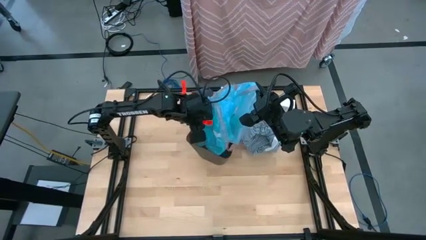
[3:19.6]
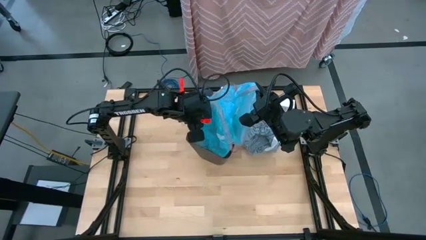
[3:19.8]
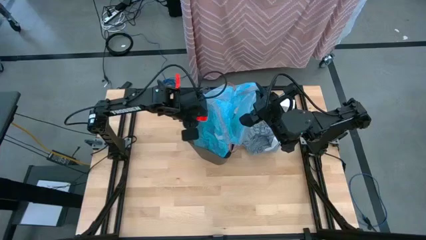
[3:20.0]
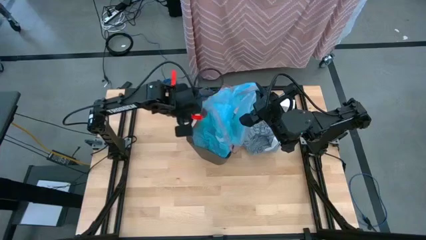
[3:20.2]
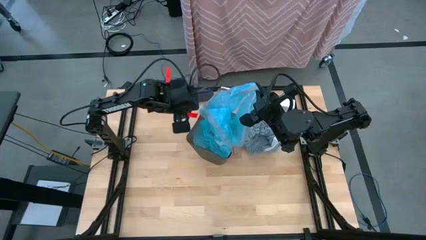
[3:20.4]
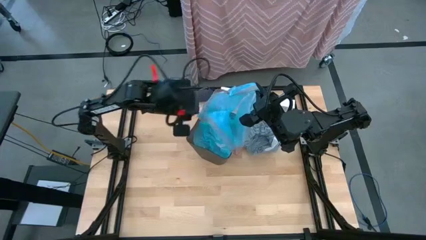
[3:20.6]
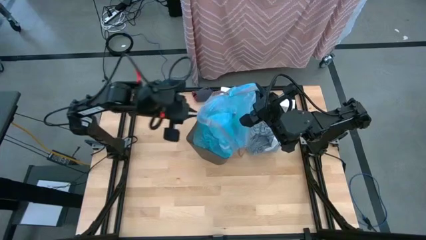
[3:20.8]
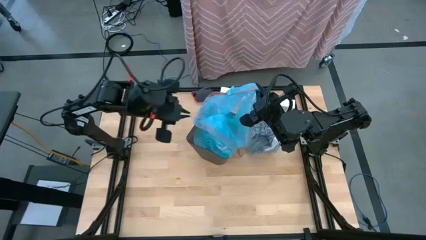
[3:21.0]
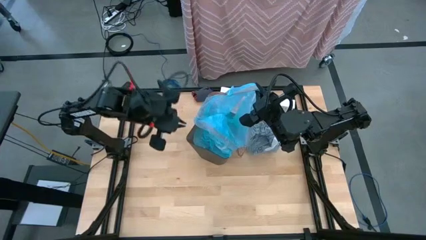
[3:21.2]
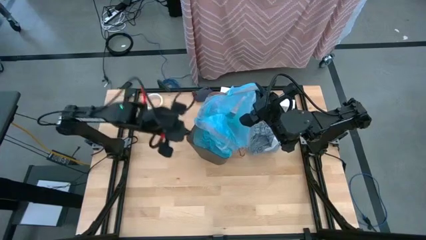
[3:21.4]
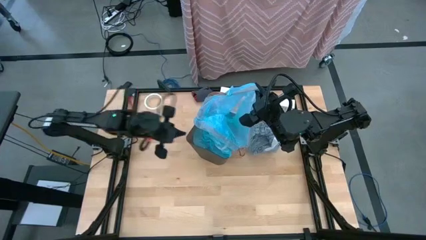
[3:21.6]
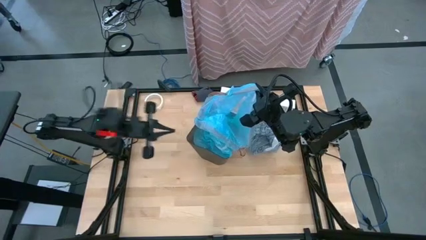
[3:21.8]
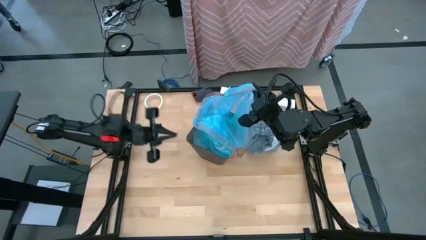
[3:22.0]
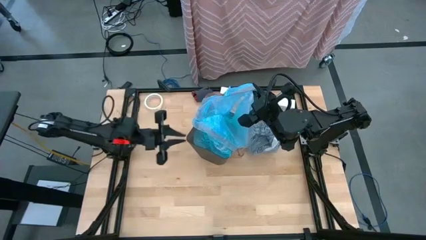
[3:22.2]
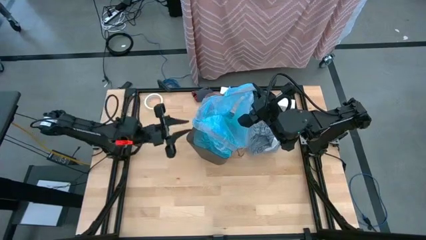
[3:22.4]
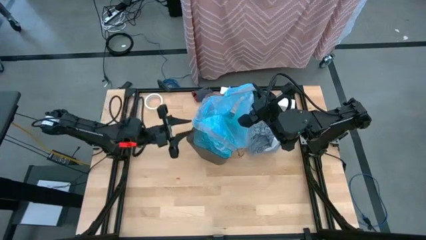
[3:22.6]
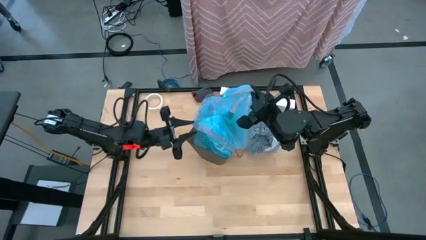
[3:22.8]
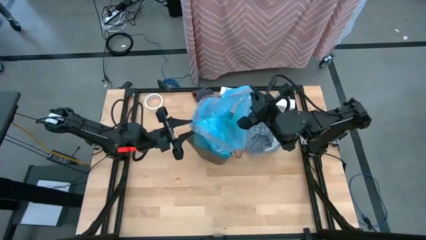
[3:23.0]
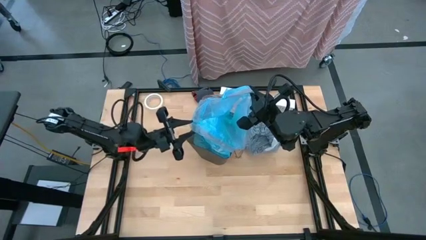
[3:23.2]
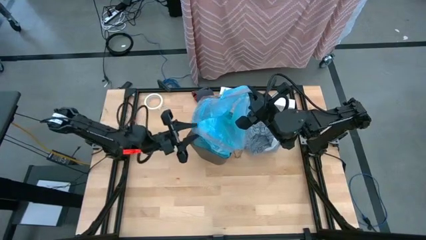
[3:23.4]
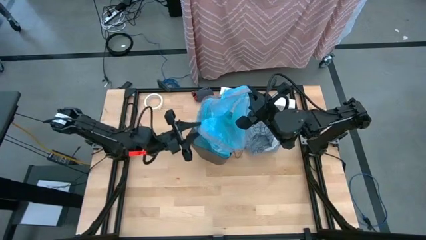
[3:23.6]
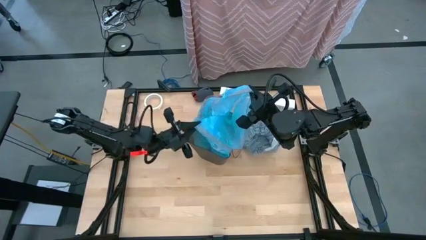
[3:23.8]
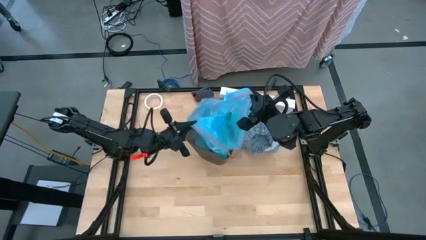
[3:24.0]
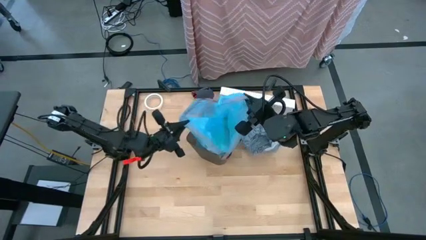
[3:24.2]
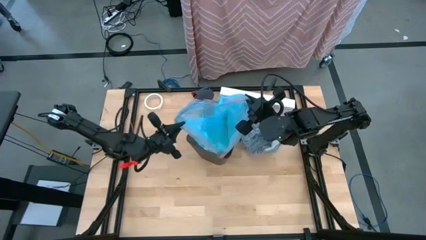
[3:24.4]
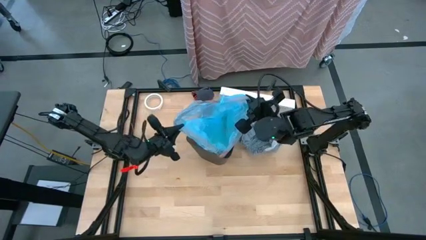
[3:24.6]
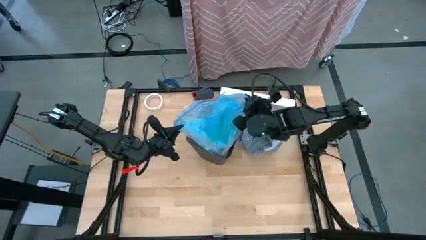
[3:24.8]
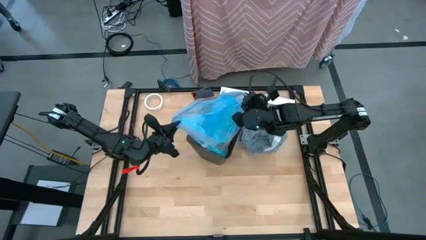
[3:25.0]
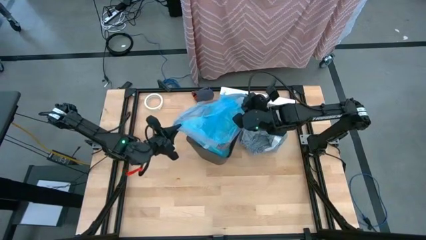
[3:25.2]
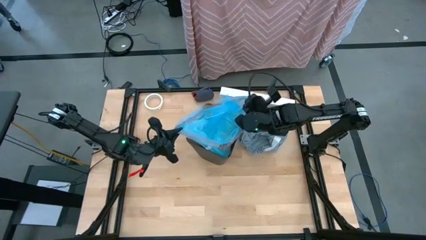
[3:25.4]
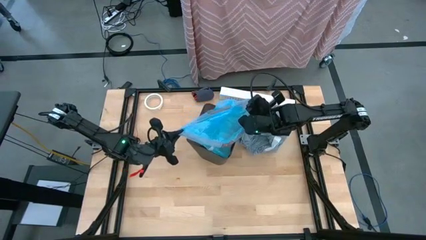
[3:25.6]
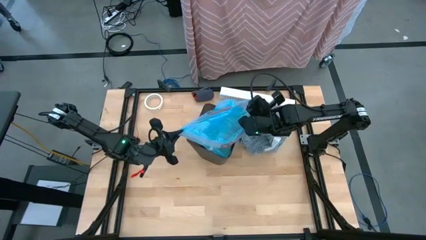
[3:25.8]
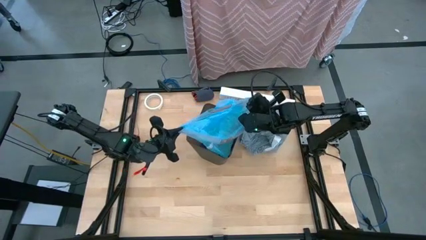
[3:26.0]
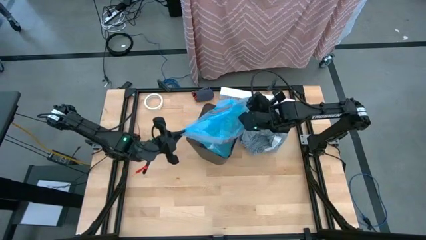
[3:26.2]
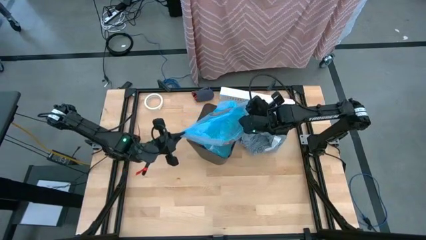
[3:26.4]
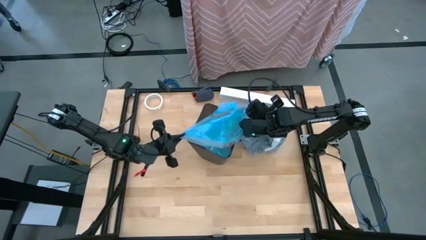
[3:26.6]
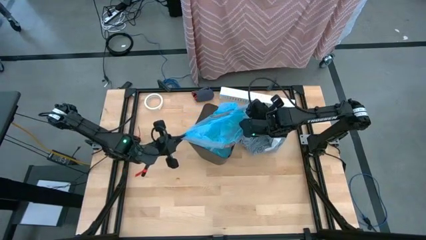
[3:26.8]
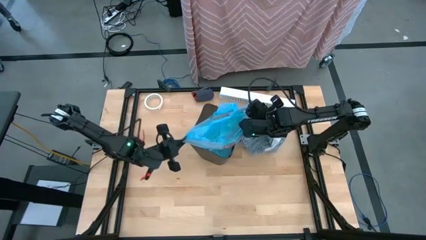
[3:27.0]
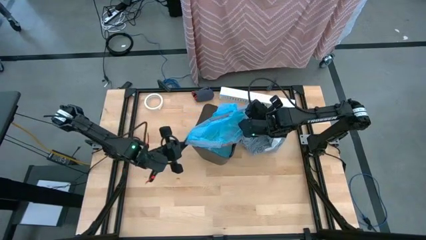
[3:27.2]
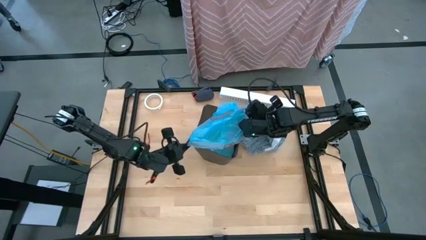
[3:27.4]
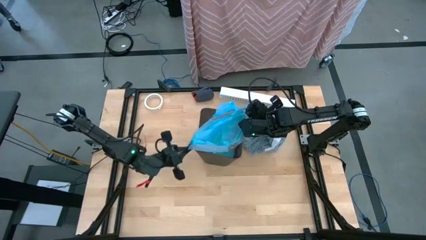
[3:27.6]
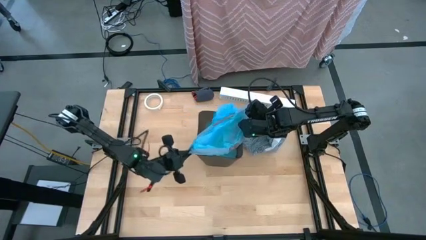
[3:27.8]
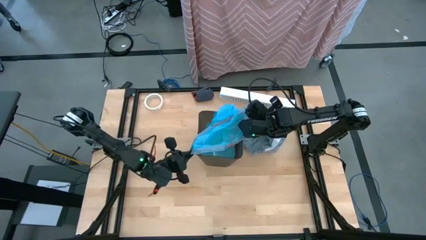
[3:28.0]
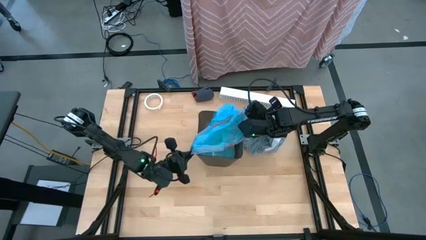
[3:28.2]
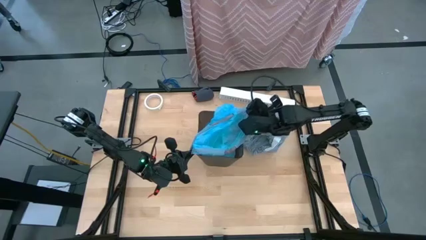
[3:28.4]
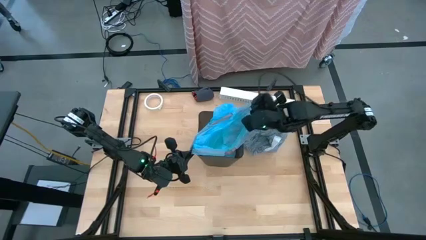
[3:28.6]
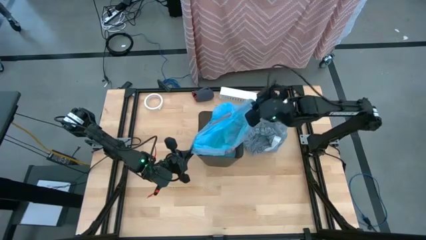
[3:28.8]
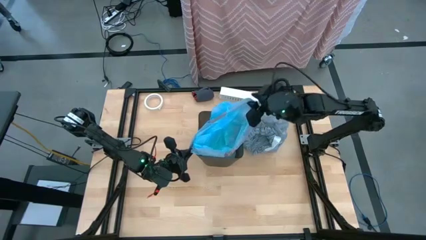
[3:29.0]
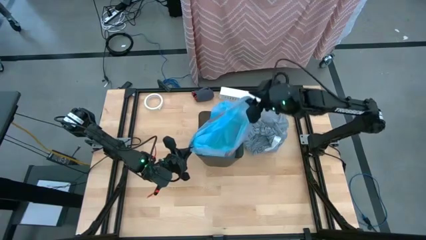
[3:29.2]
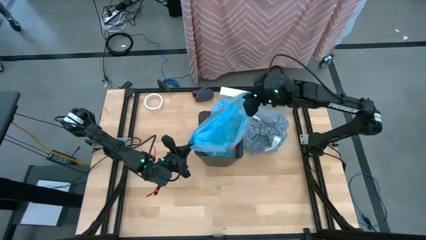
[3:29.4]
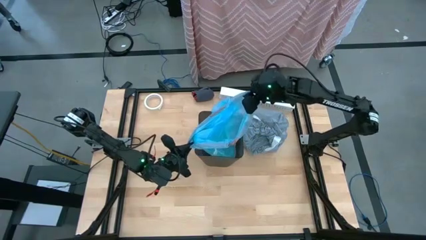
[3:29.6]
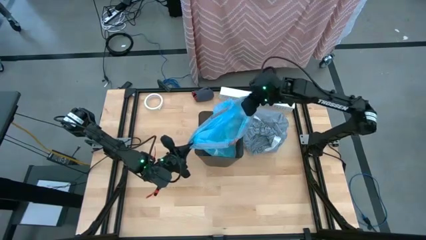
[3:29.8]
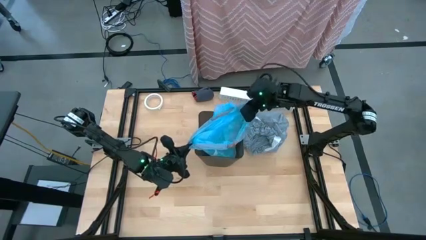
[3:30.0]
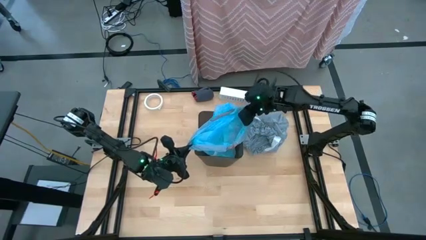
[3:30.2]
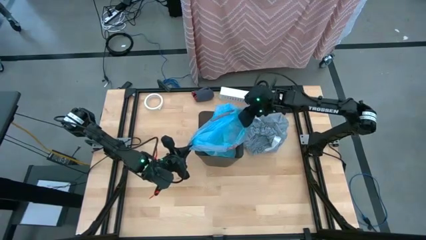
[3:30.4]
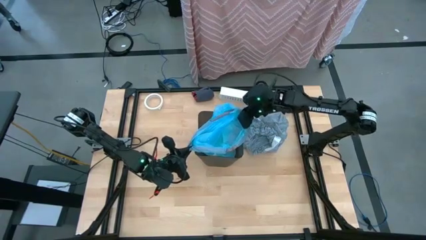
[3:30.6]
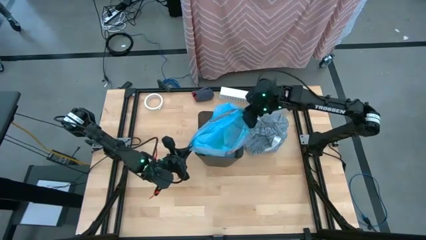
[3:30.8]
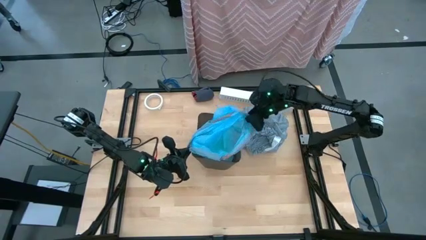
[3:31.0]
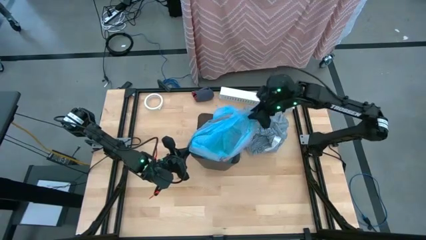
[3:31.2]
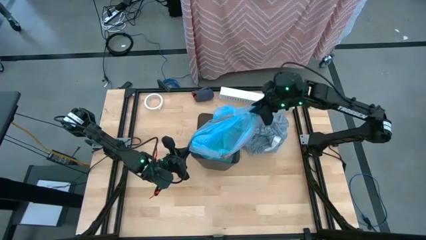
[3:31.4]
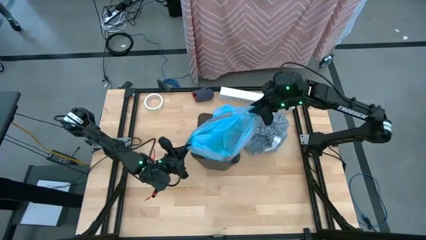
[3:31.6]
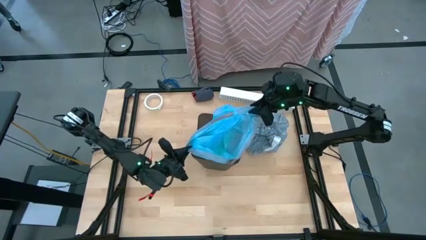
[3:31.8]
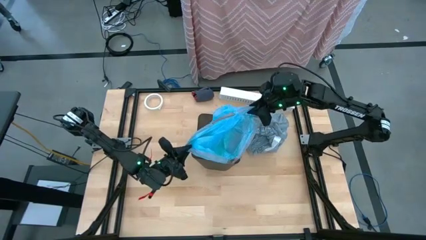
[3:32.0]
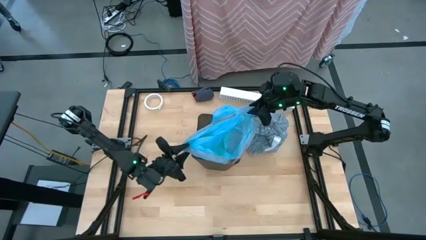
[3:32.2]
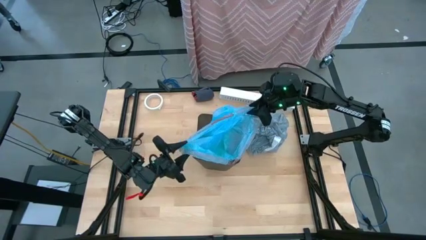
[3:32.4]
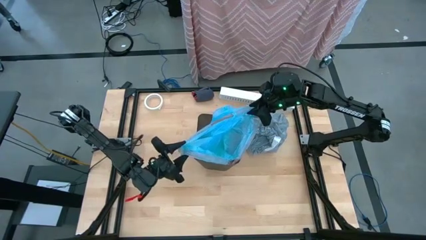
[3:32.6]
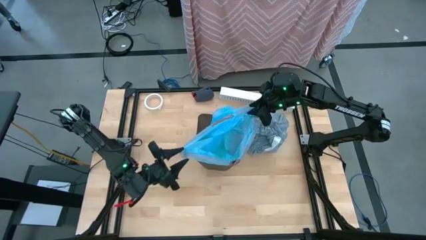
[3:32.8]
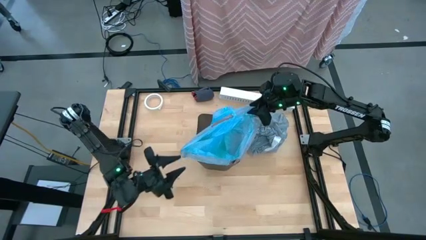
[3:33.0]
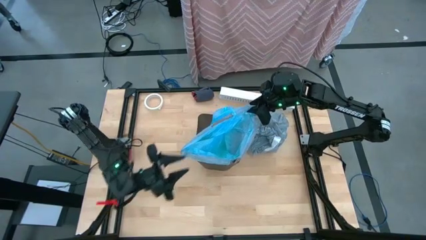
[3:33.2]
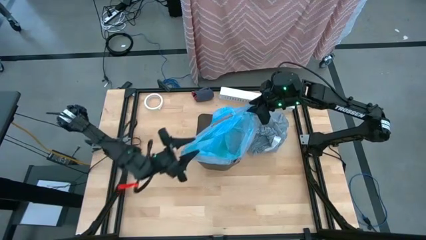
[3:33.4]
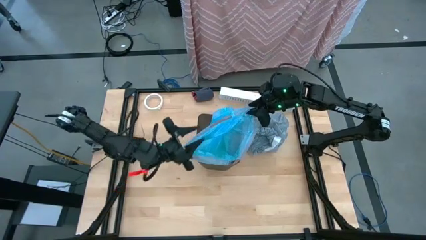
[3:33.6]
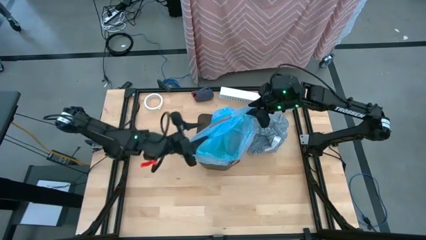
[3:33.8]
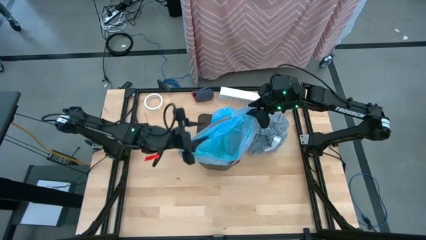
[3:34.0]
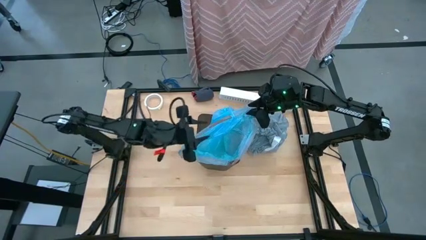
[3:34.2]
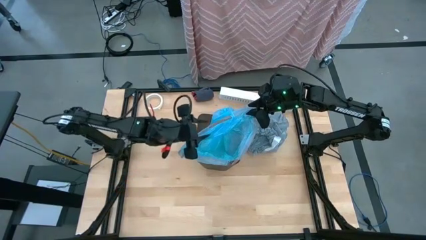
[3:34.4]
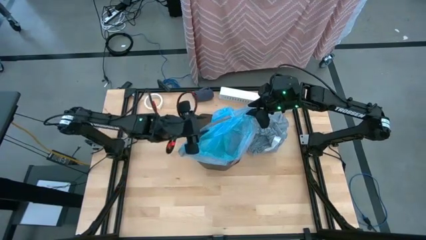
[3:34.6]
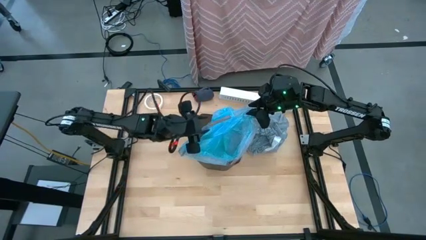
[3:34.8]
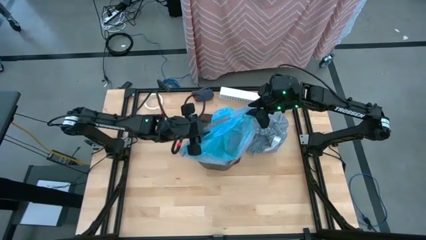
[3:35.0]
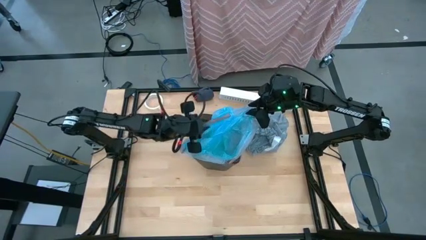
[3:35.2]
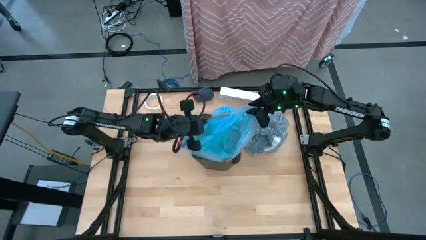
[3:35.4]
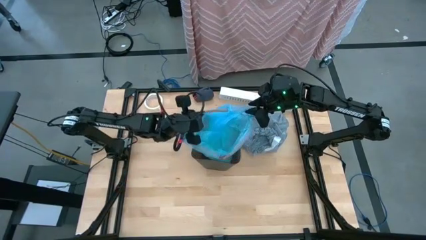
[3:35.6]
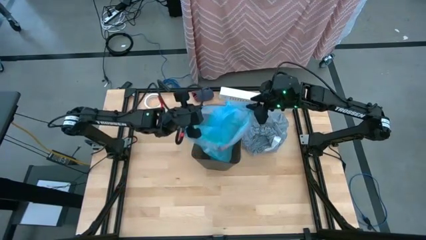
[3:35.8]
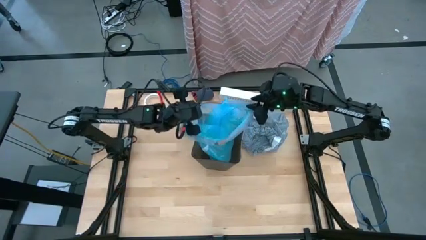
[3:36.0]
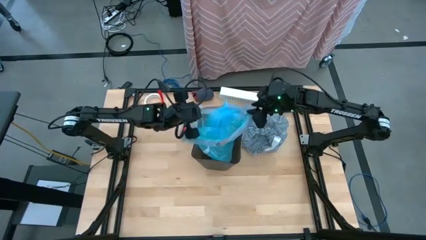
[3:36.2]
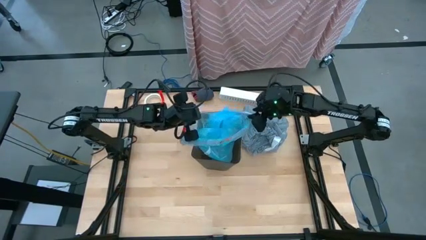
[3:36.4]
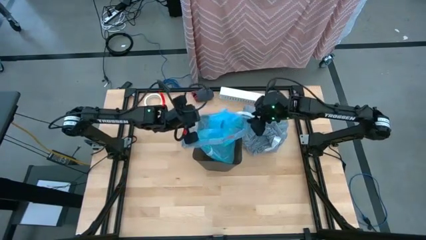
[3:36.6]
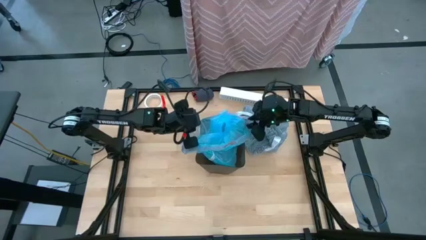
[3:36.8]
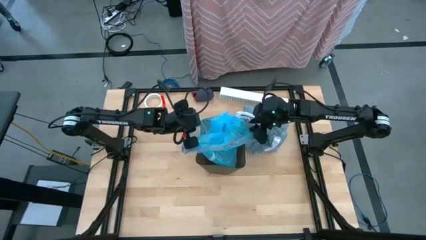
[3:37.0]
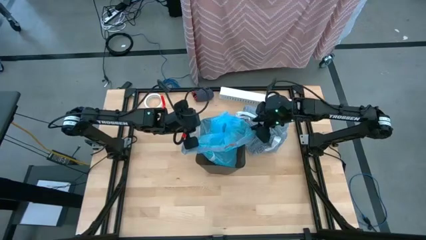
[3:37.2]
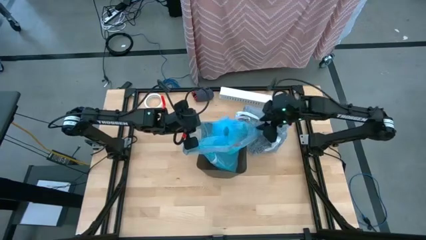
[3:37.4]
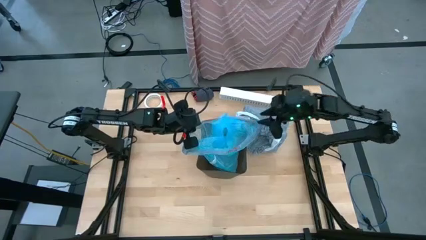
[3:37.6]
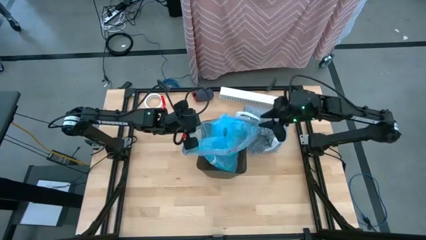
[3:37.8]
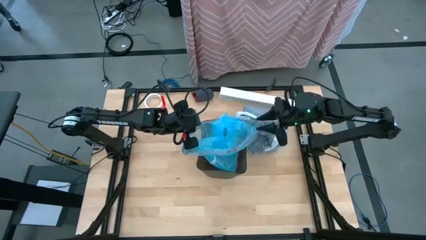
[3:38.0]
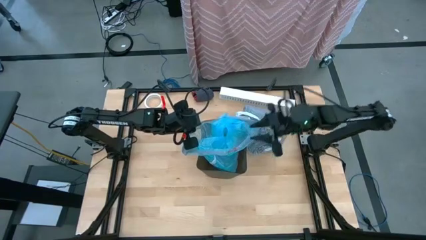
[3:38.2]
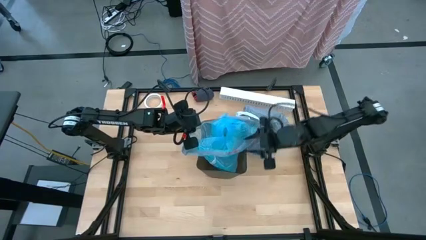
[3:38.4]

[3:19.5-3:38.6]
Task: place trash/remove bag and relplace
Insert the new blue trash bag into the black trash bin
